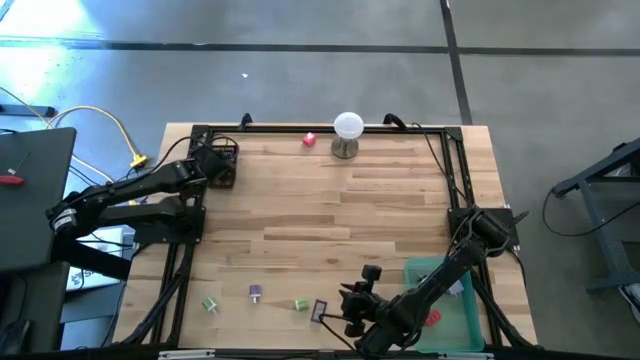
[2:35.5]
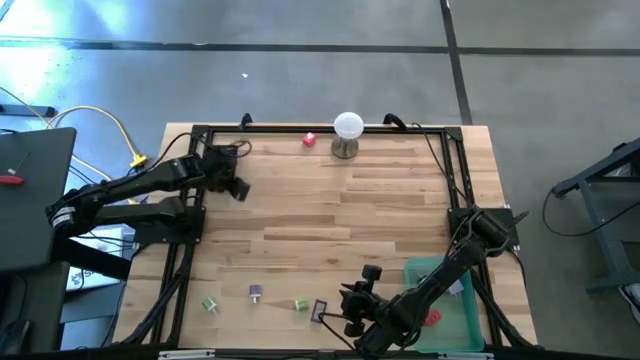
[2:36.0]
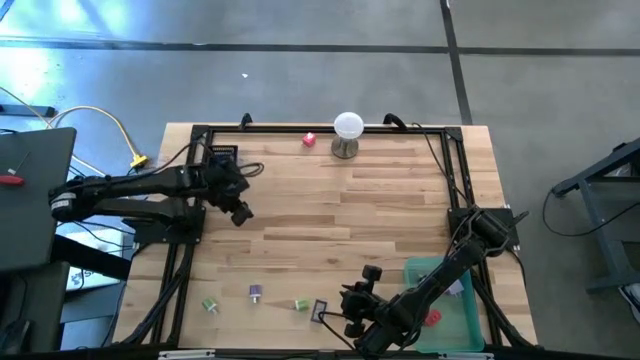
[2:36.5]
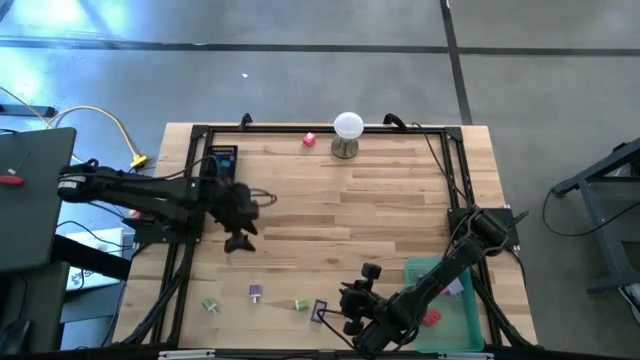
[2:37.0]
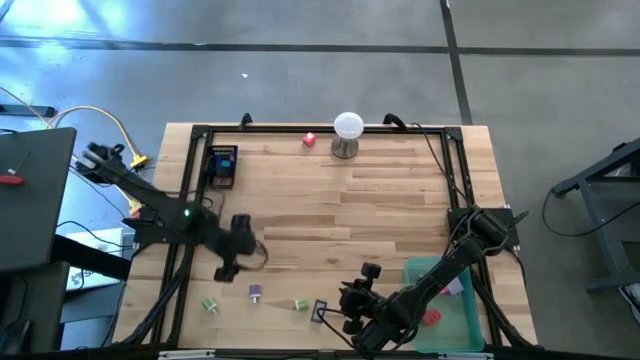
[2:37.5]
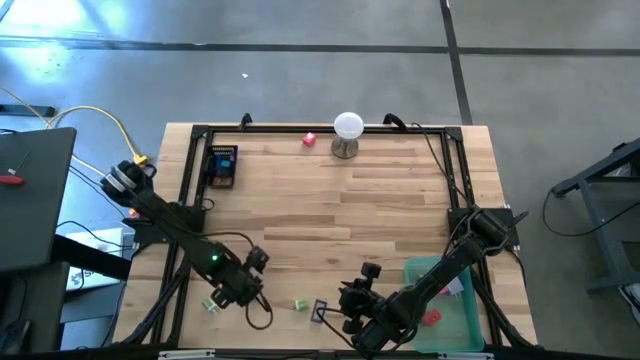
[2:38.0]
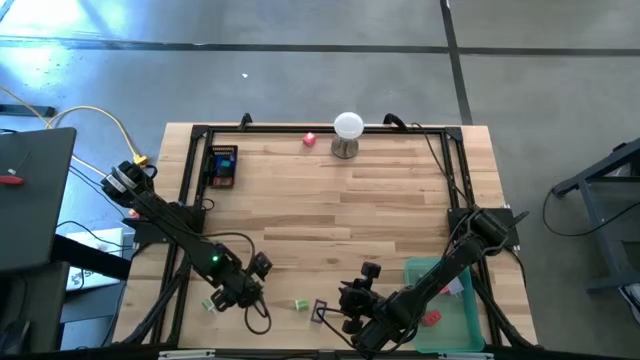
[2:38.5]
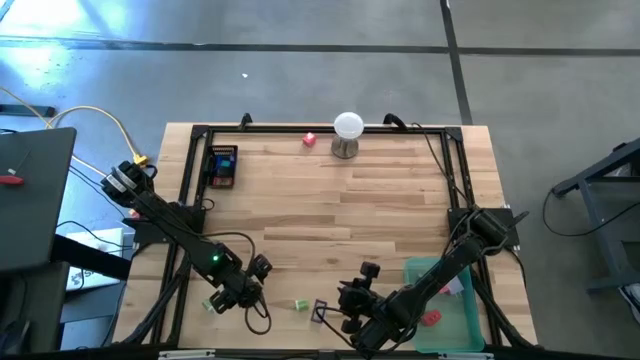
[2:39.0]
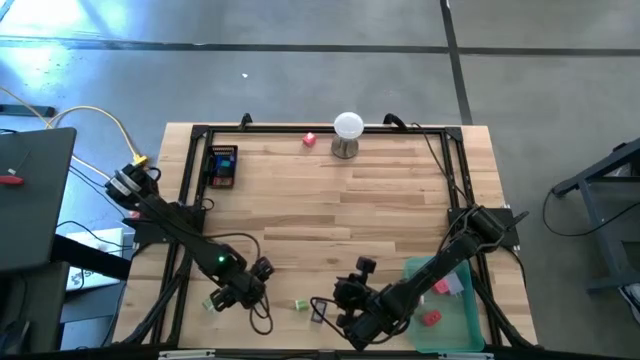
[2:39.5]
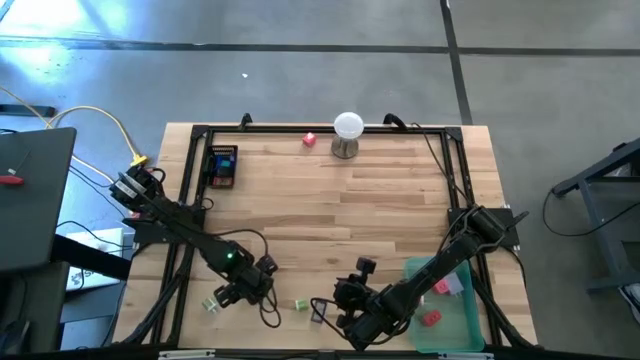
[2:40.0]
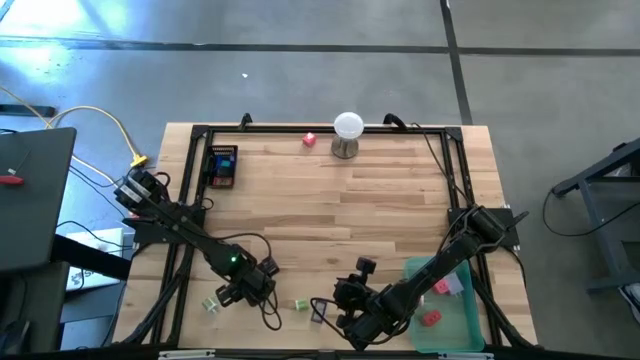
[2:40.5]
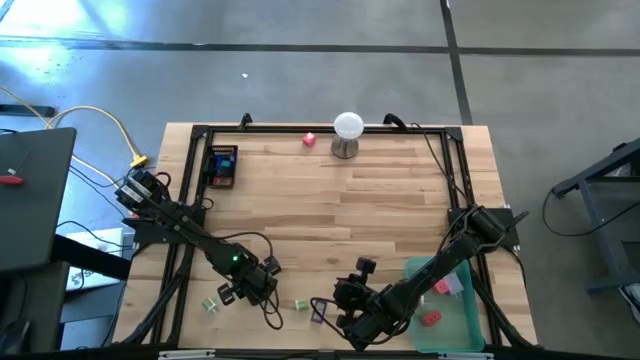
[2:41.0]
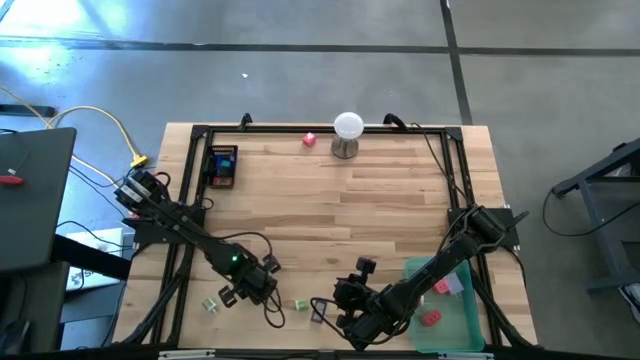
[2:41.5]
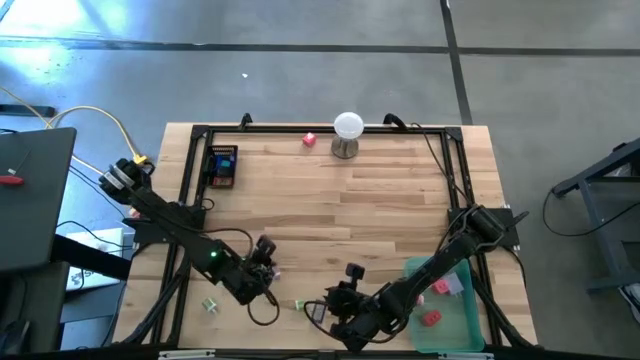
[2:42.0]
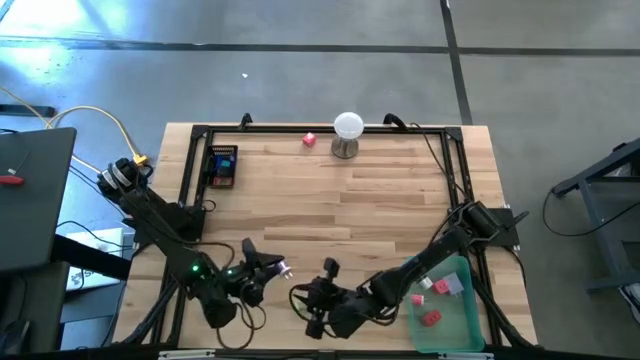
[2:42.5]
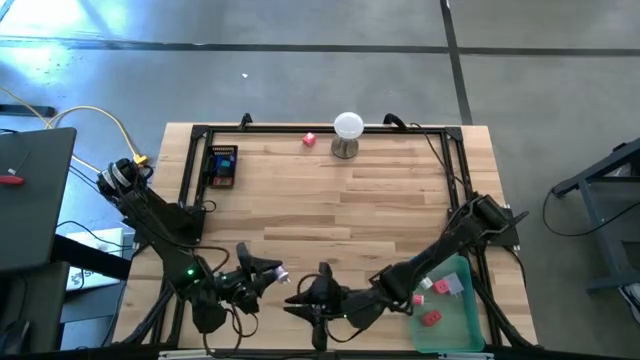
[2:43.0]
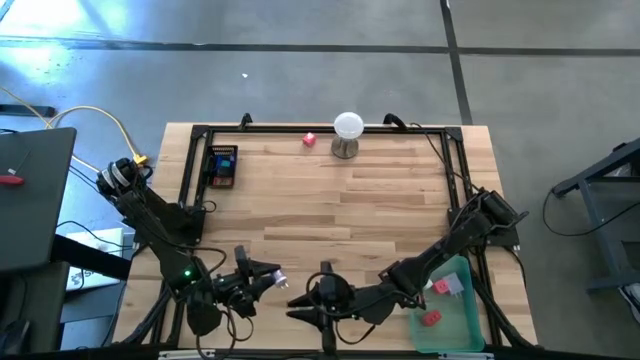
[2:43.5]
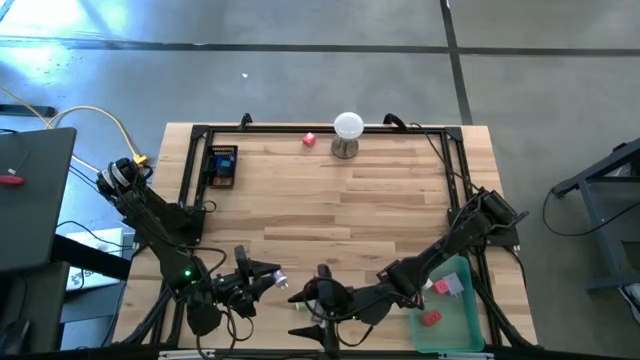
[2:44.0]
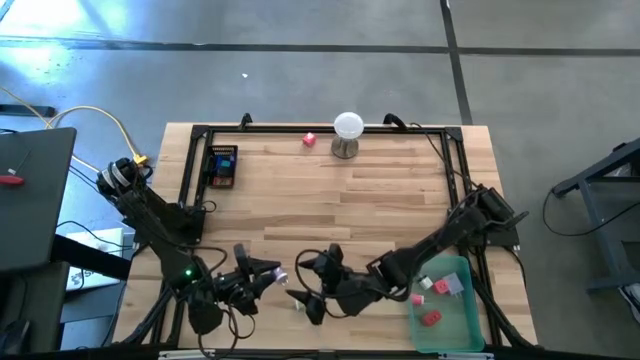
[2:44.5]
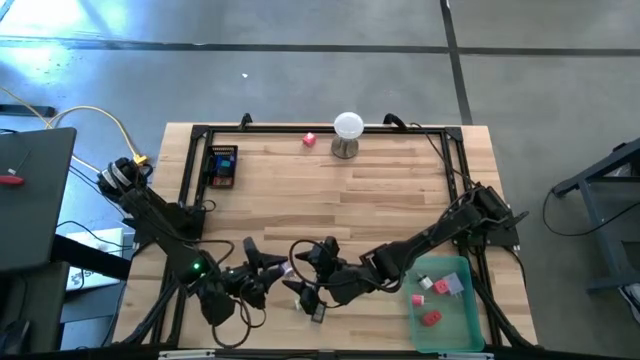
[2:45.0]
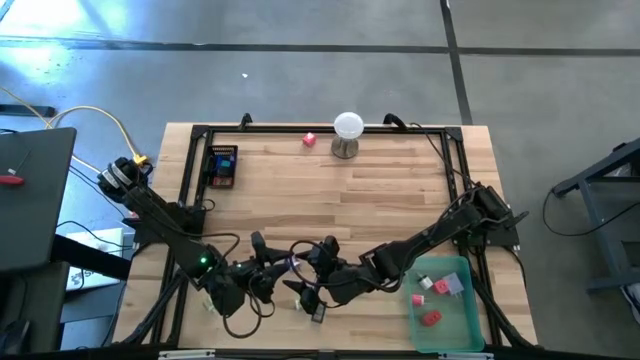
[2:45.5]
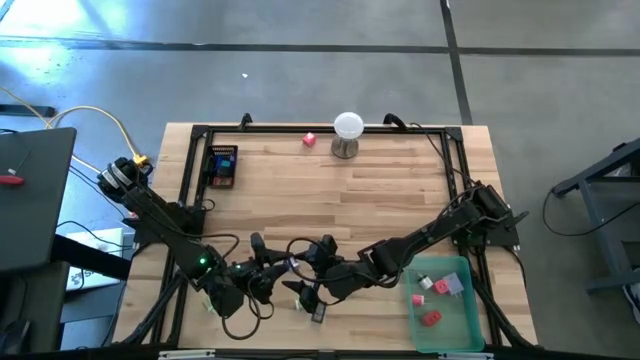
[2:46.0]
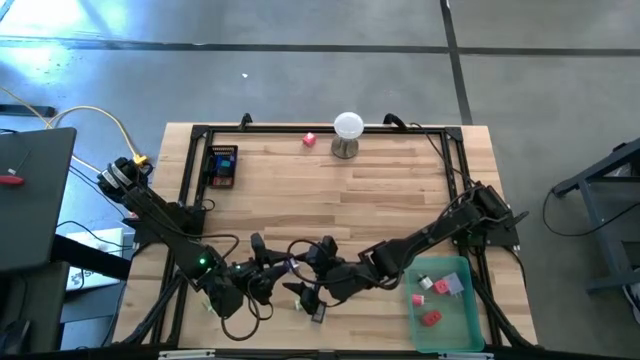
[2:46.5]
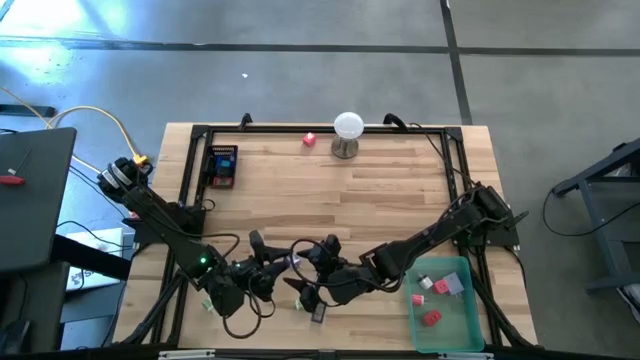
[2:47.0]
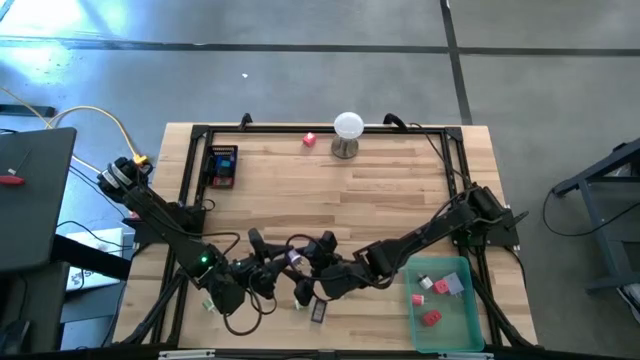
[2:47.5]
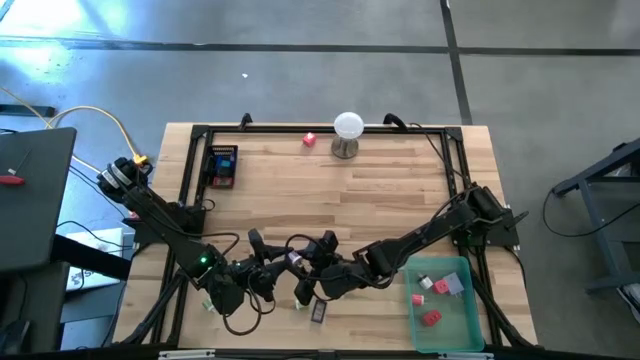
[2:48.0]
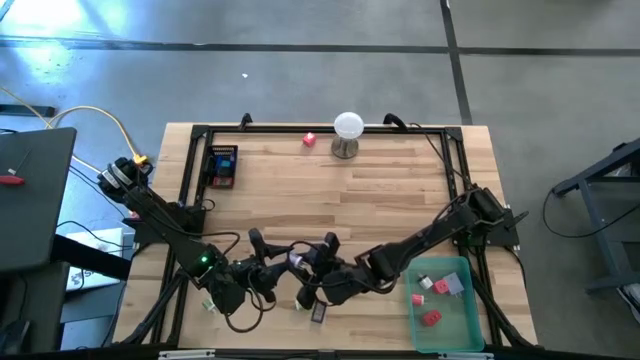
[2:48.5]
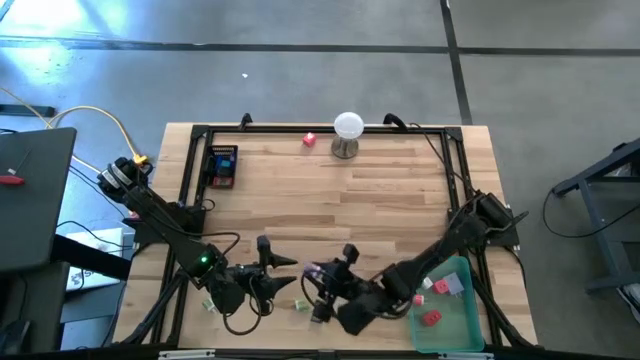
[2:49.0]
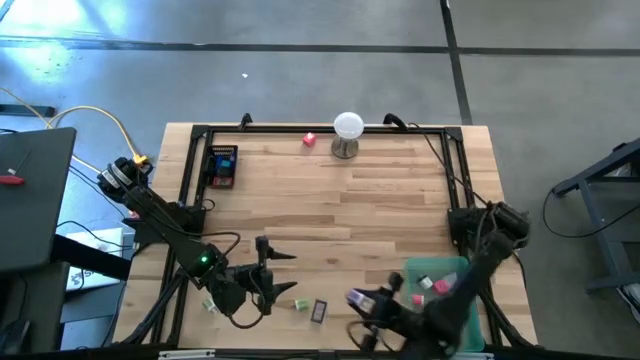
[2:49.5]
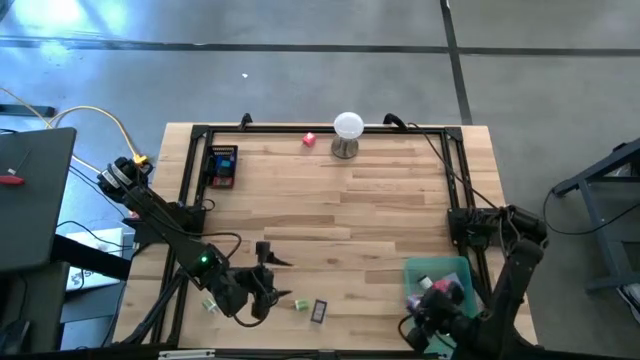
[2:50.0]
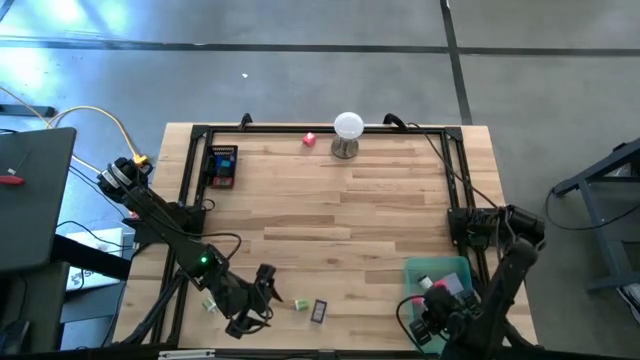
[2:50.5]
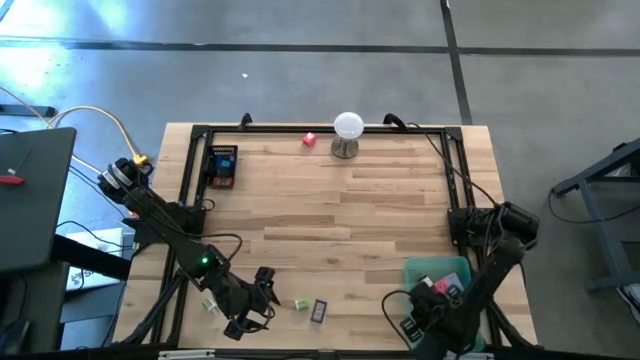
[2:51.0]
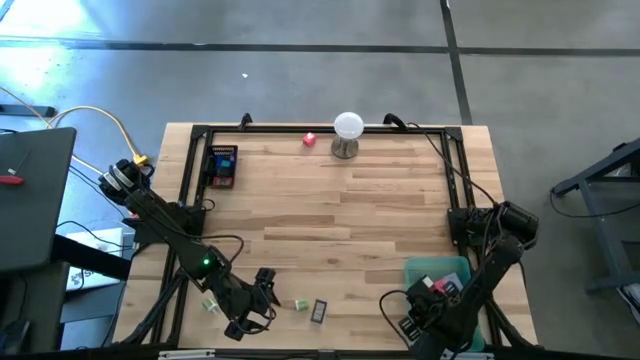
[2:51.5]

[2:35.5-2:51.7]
Task: Pick & Place Office items
Put the blue charger adapter into the green bin

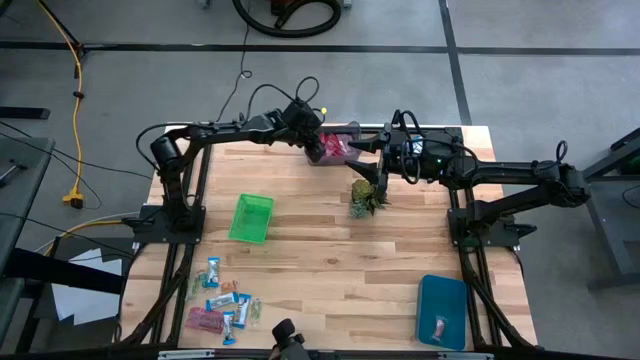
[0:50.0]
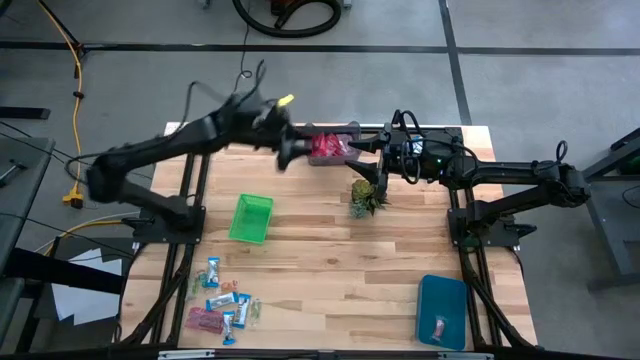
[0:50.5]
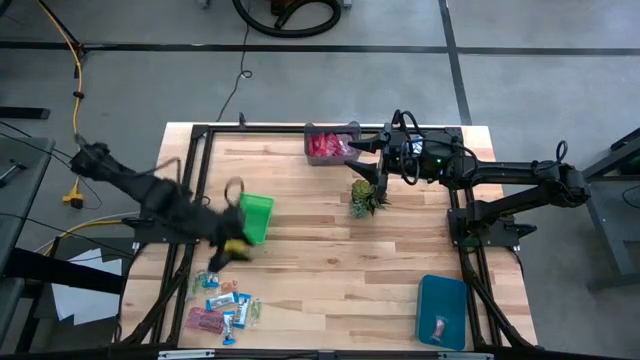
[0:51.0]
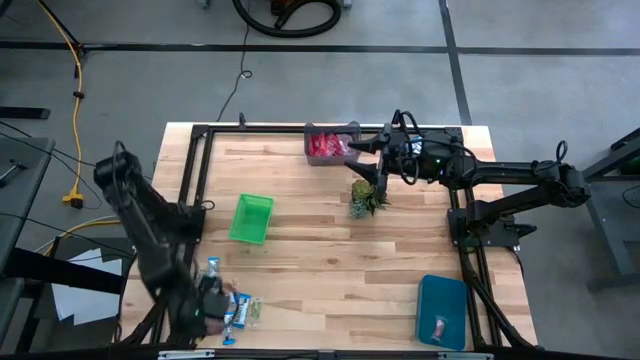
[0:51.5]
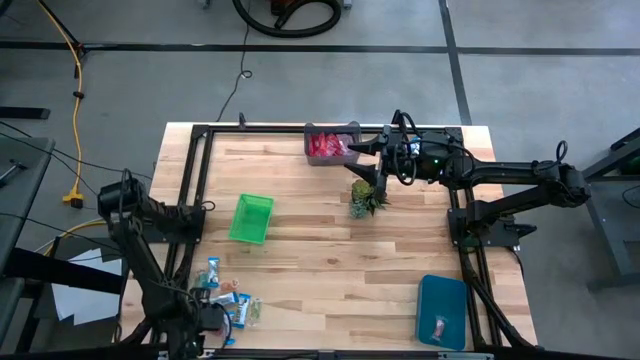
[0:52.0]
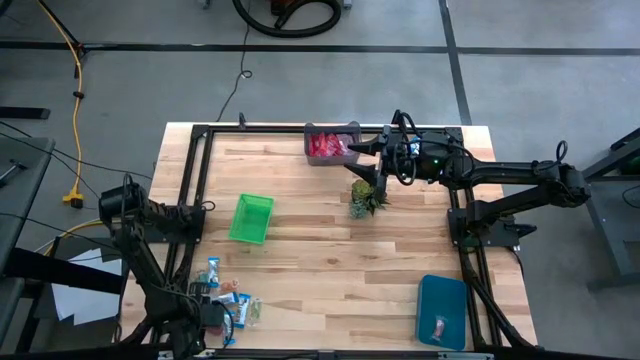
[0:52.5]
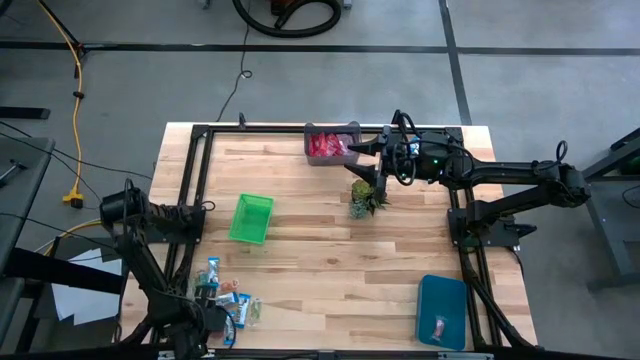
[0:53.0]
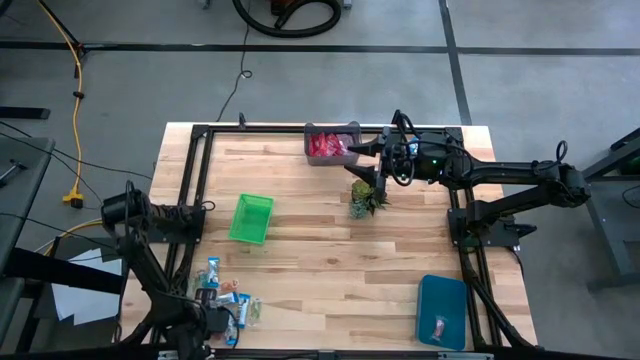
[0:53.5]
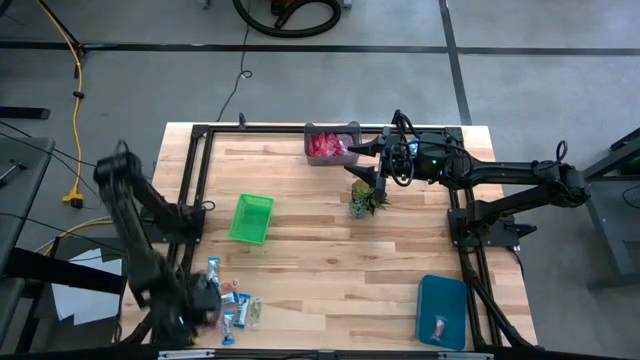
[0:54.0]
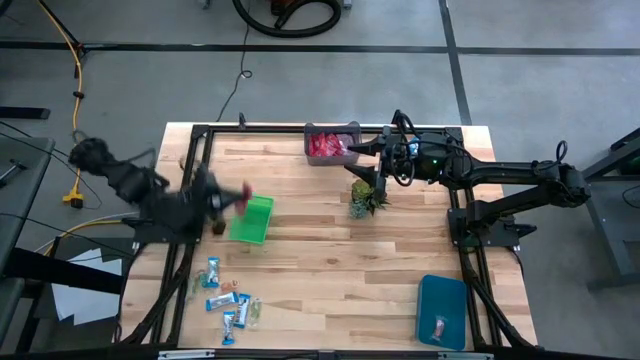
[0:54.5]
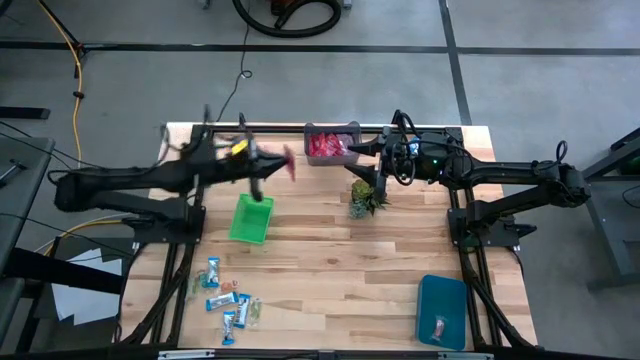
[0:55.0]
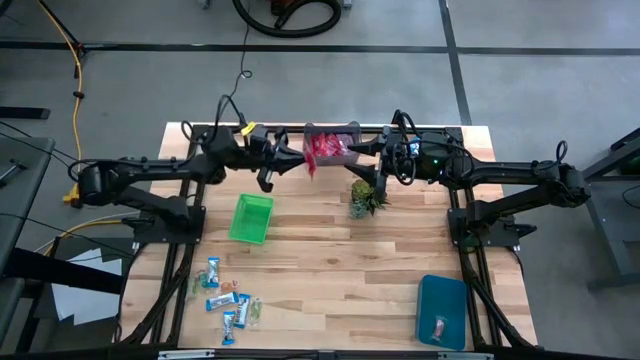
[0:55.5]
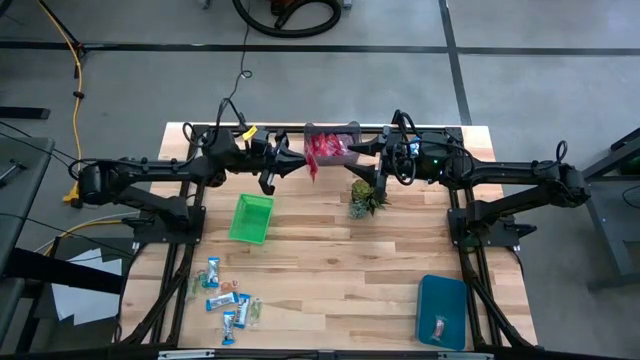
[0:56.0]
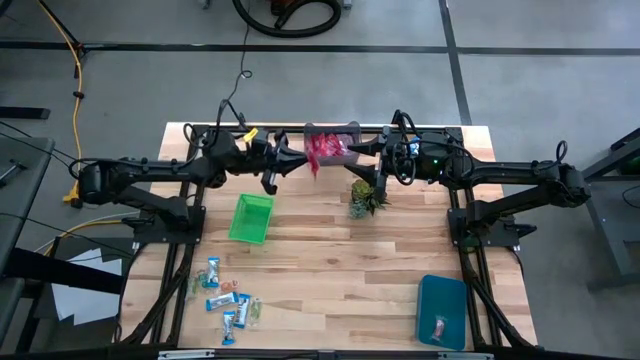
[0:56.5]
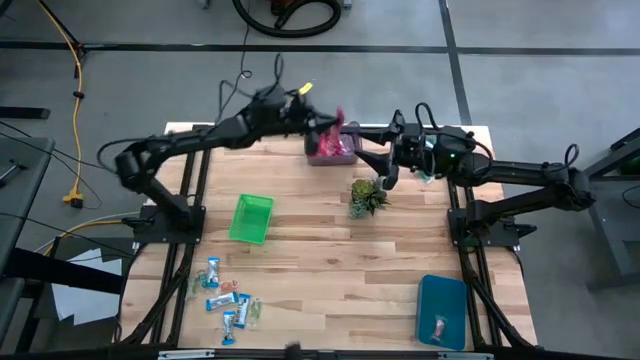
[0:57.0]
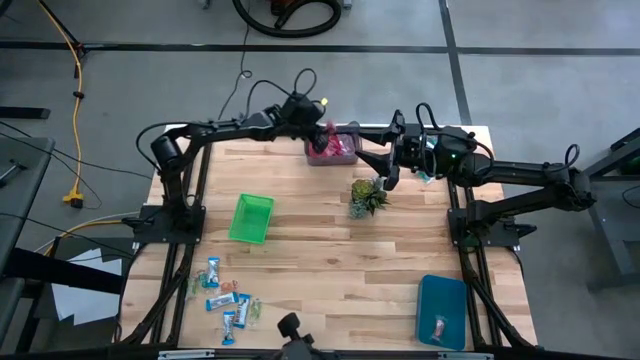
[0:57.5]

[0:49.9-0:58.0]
Task: Sort candy
Put the red candy into the black transparent bin
